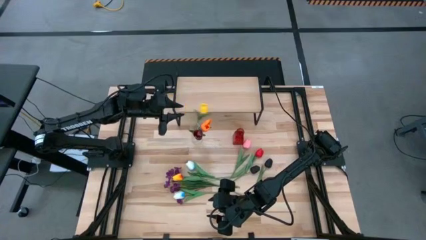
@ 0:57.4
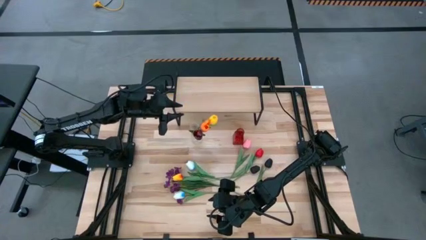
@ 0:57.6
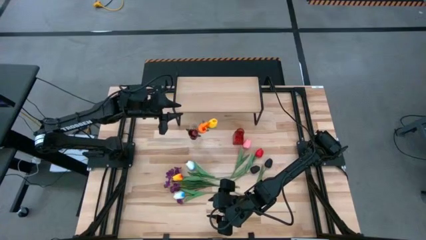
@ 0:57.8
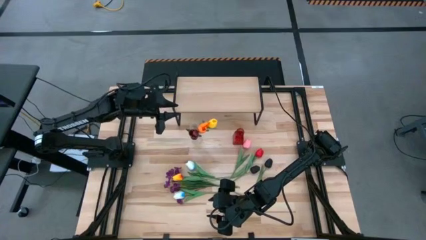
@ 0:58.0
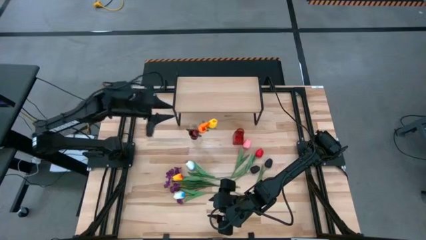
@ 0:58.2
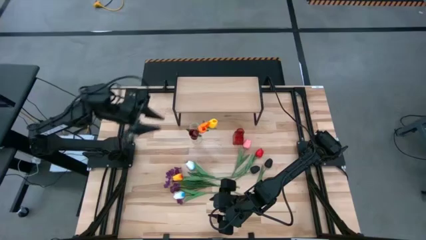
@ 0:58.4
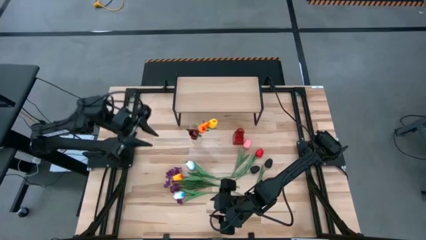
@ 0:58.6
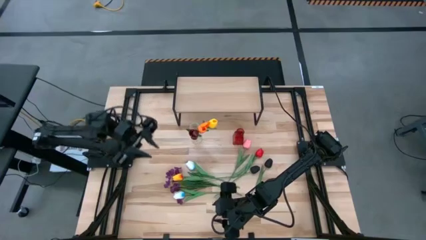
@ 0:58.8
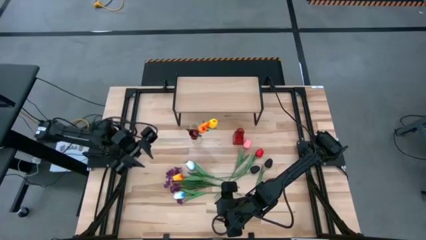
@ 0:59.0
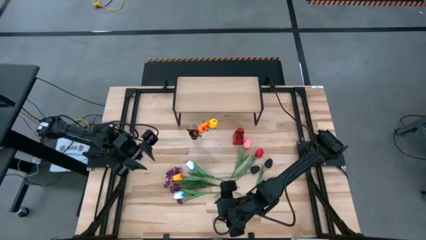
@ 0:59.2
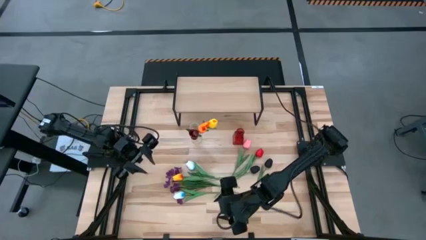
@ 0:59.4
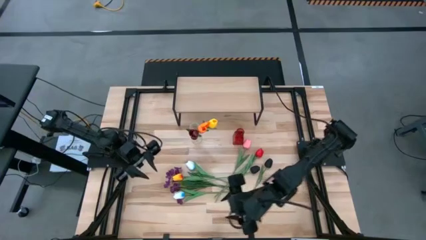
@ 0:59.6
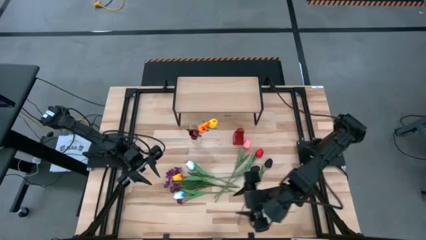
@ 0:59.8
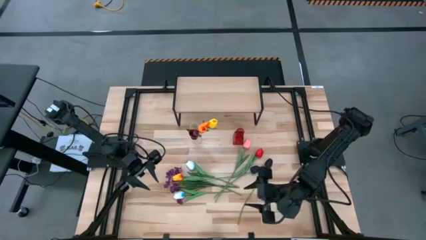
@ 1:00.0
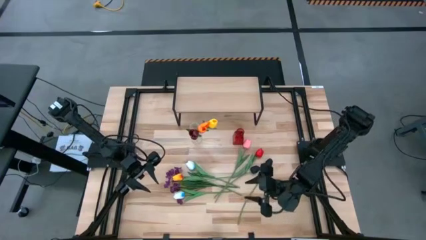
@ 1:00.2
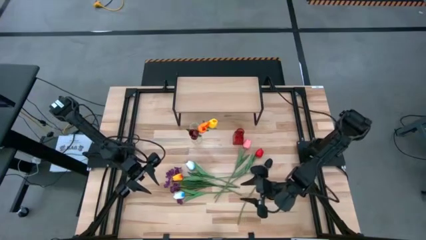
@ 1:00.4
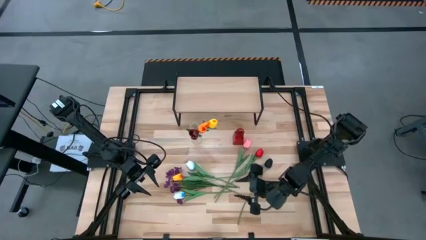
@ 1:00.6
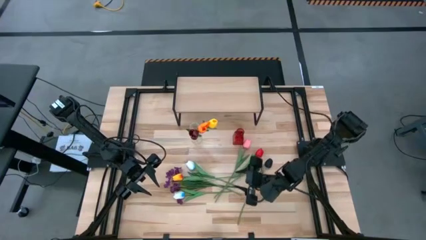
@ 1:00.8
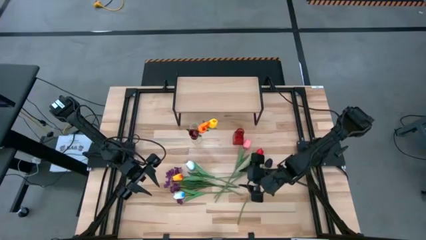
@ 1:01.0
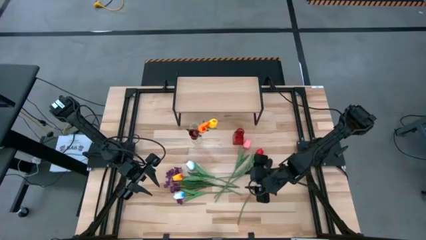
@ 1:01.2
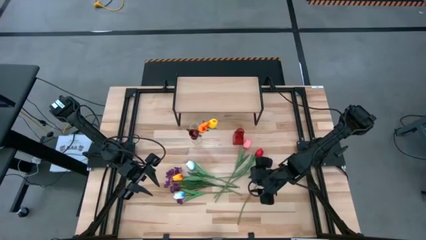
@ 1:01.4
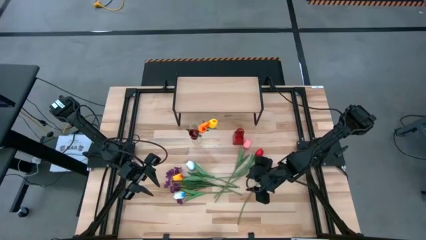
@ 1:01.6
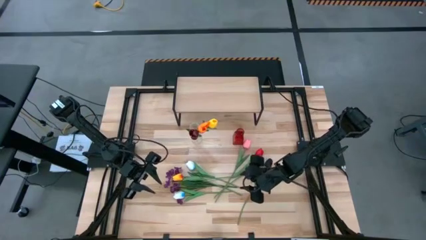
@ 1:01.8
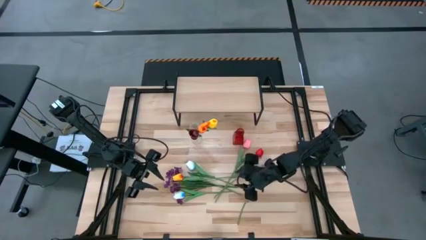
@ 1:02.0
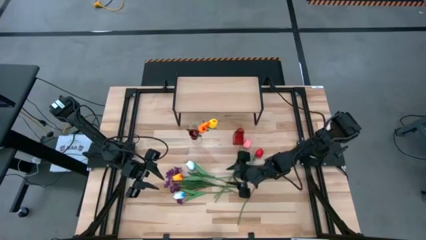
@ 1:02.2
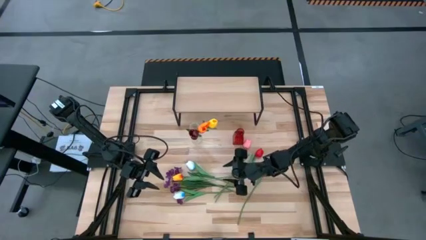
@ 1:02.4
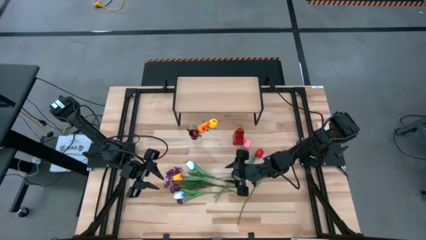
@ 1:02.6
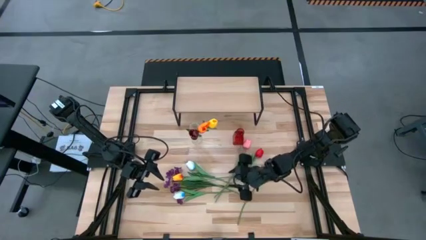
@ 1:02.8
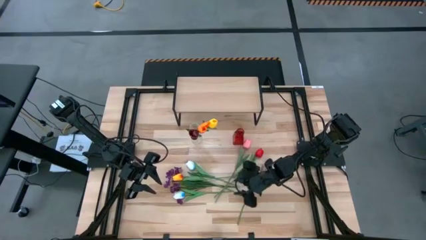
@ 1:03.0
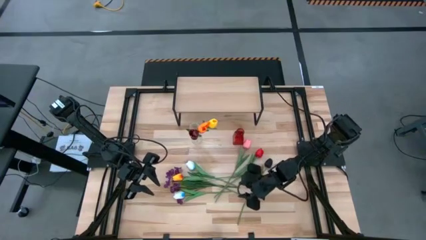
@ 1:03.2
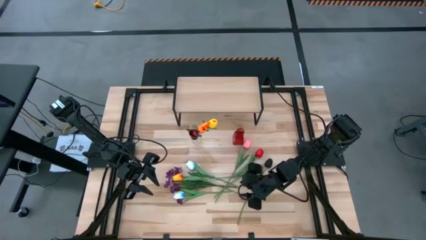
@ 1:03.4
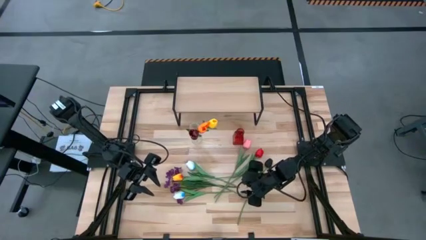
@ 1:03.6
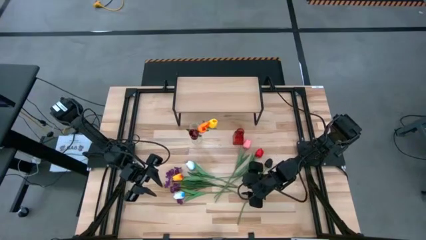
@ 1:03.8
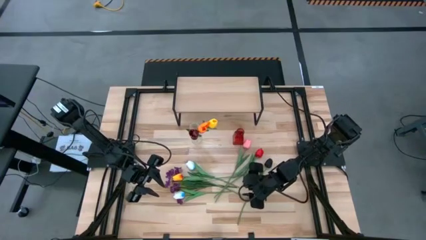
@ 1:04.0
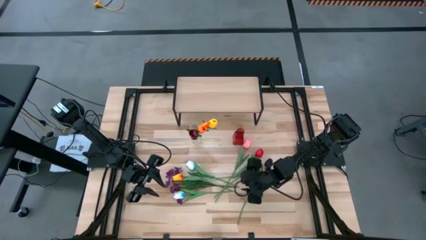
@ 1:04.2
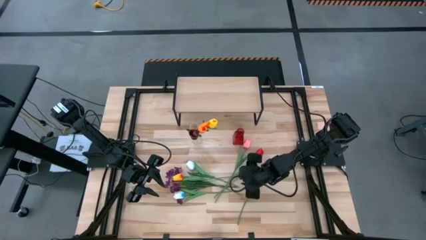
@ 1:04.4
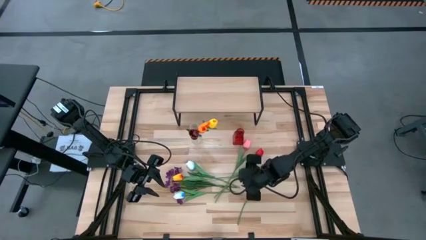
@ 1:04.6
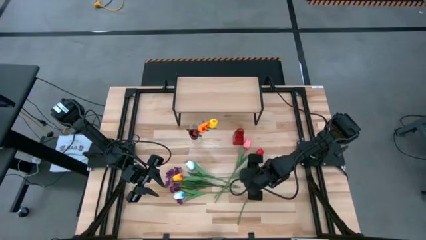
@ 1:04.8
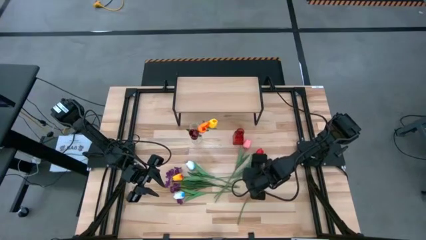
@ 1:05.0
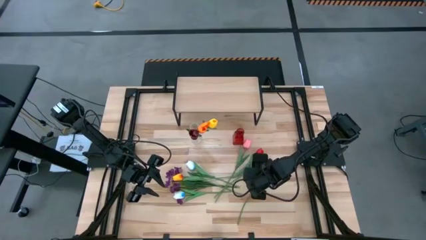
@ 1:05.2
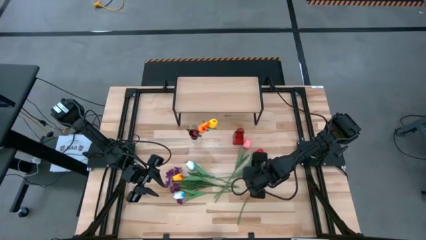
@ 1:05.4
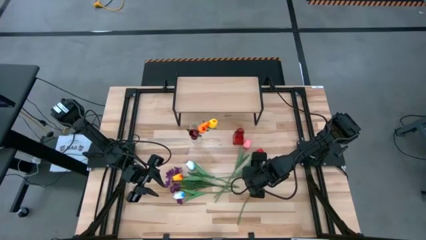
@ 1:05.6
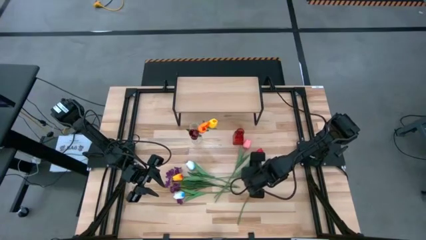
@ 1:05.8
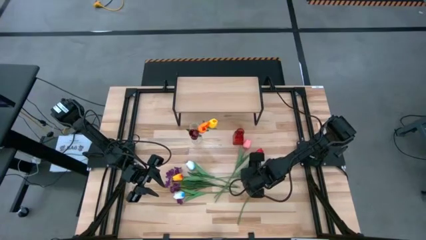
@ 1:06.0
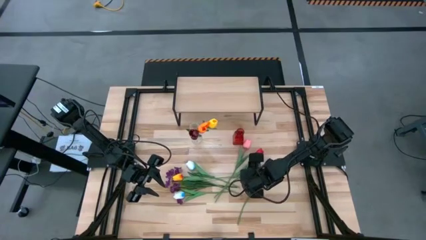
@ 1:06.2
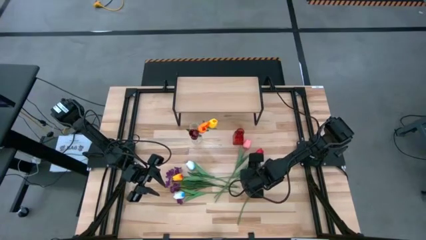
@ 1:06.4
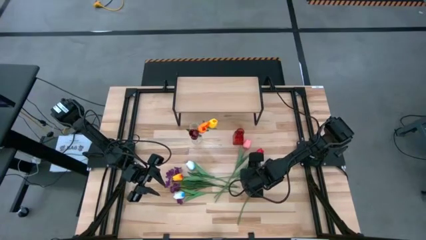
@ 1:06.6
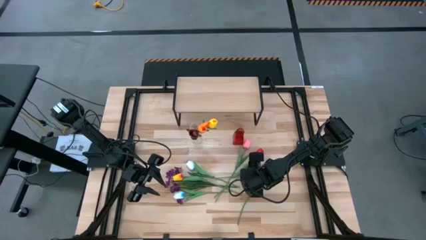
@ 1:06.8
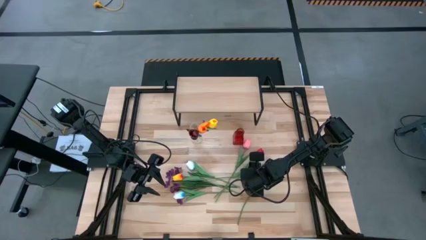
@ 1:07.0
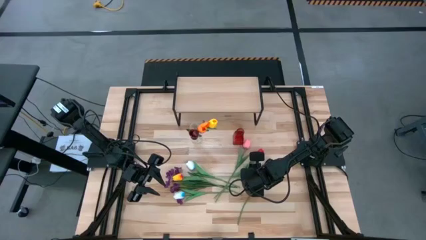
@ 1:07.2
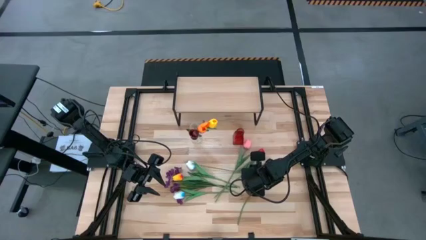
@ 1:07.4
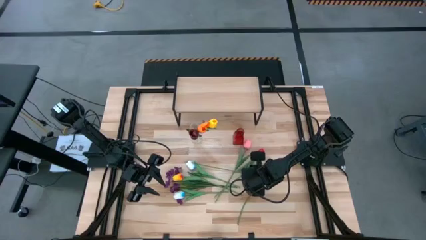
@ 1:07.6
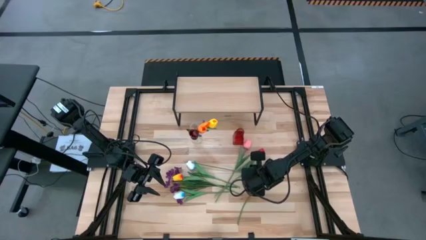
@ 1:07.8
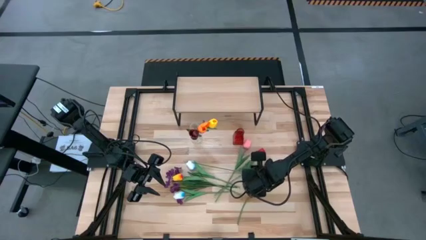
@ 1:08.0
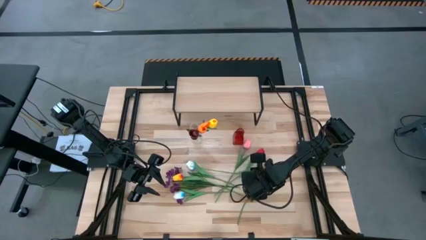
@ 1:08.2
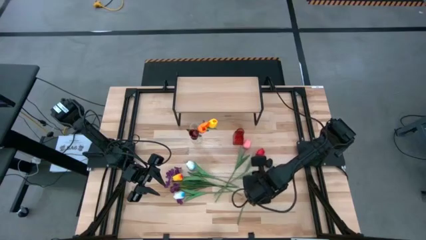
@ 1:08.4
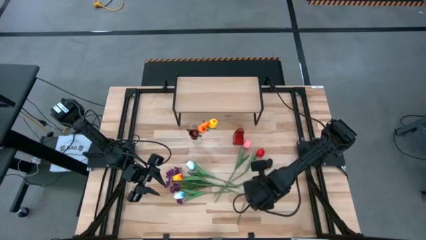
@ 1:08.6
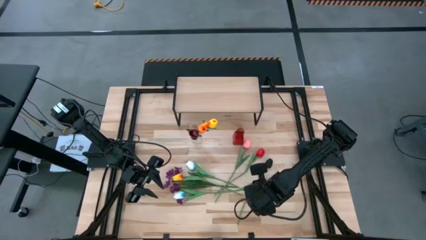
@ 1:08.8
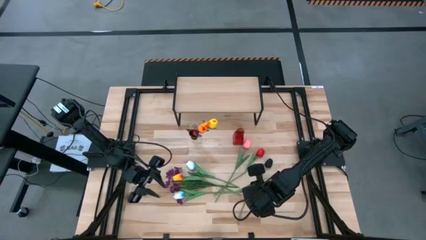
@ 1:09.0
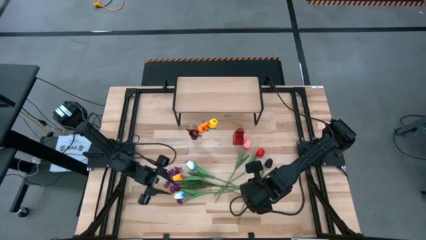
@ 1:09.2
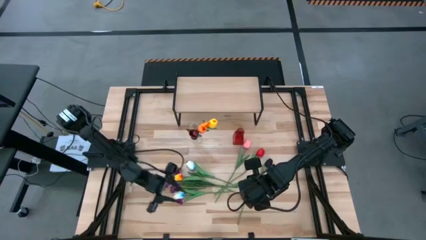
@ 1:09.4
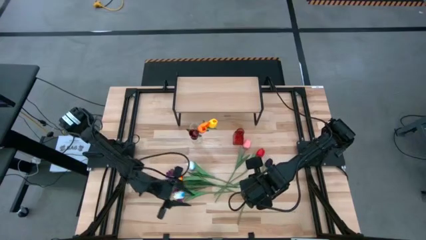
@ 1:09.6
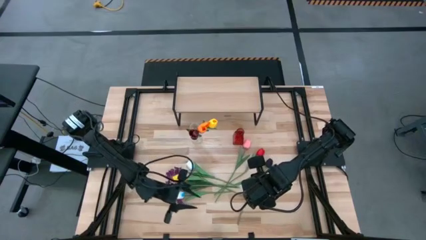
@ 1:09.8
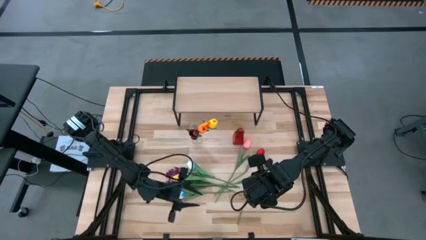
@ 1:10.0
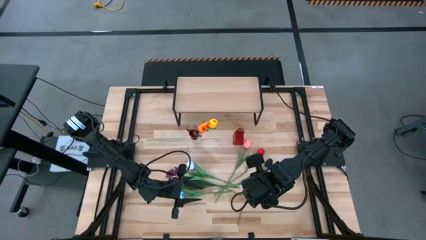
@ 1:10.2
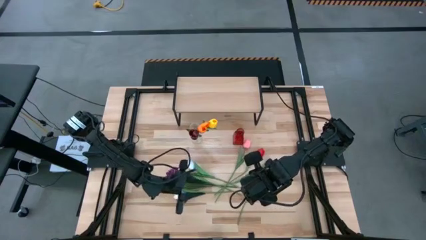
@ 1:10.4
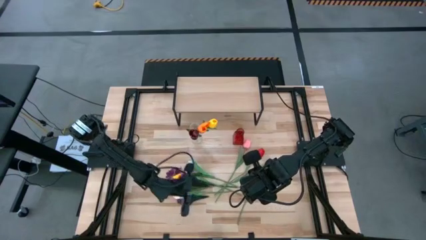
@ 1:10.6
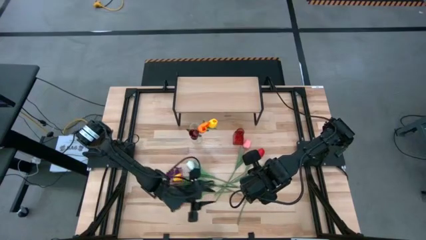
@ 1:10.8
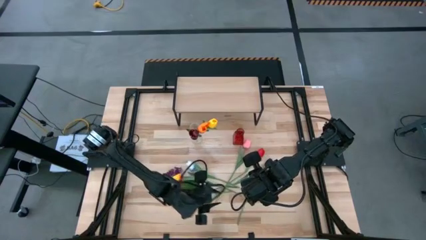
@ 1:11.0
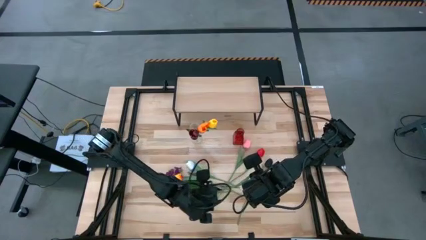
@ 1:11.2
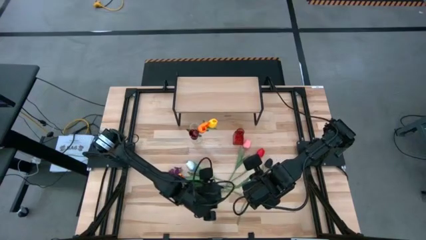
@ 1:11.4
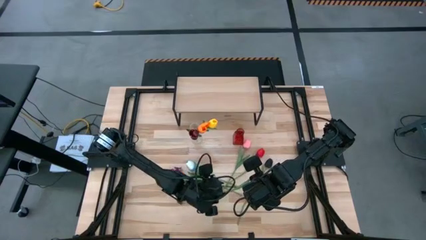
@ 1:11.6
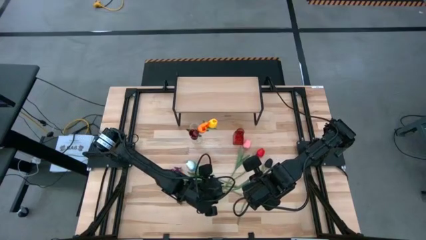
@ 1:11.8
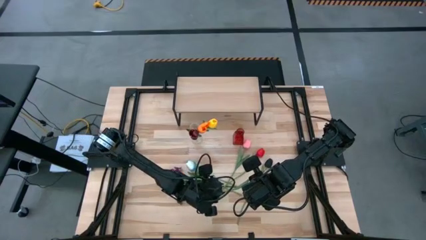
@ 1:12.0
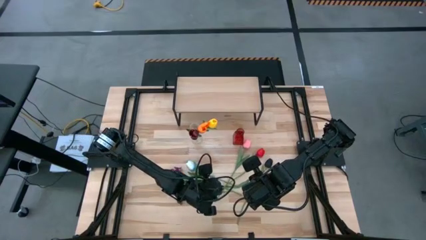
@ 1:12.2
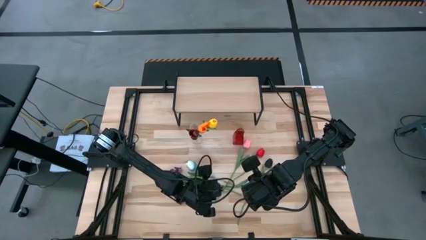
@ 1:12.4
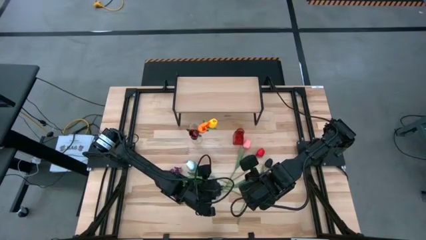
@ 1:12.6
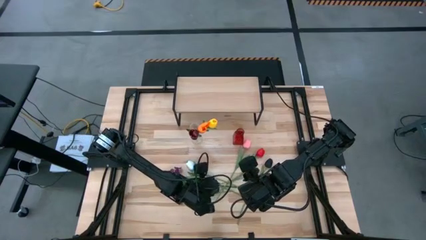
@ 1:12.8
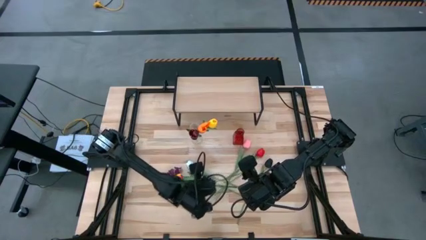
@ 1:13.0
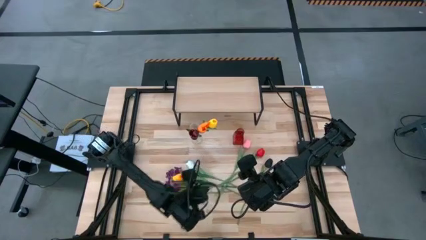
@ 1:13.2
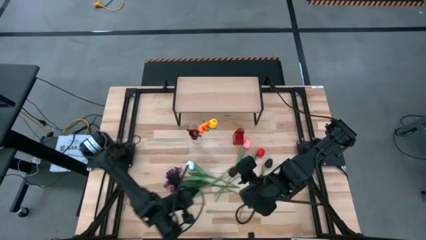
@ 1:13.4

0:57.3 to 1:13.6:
Task: Pick and place flowers into a vace then onto a shelf
Put the left black tulip into the transparent vase

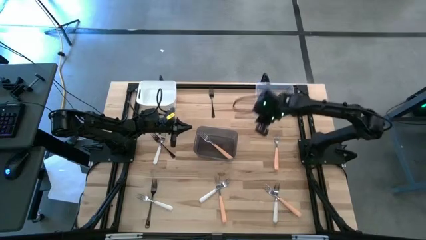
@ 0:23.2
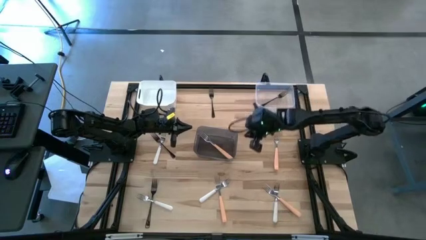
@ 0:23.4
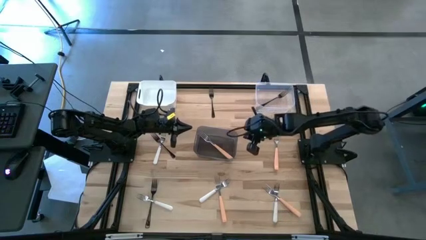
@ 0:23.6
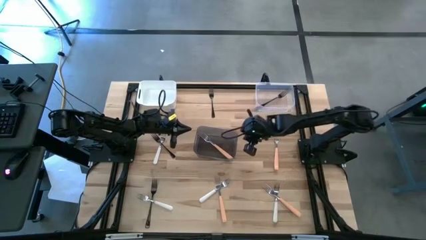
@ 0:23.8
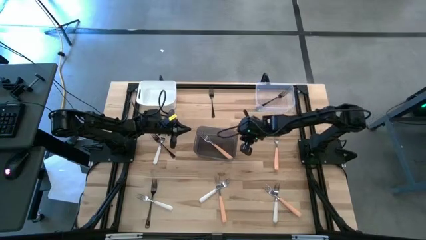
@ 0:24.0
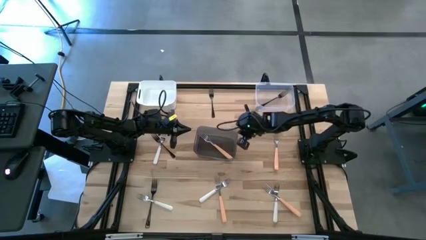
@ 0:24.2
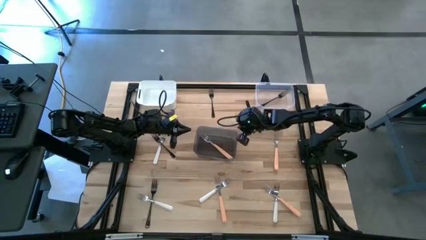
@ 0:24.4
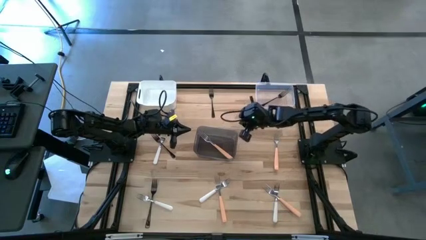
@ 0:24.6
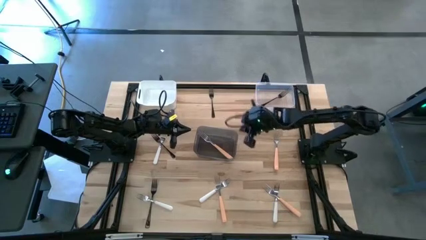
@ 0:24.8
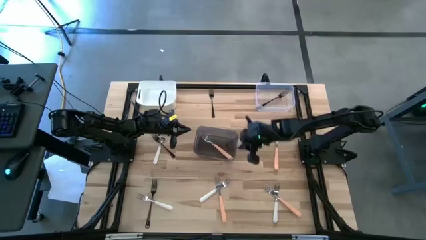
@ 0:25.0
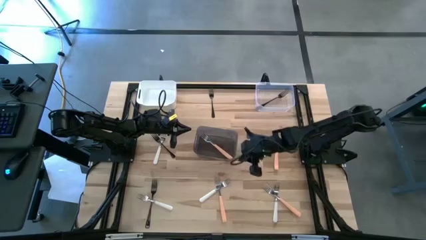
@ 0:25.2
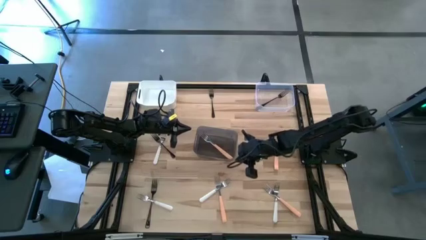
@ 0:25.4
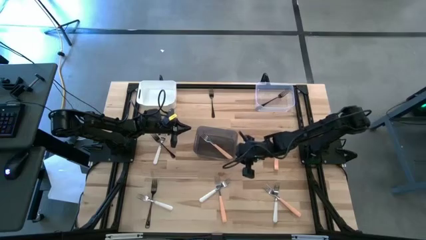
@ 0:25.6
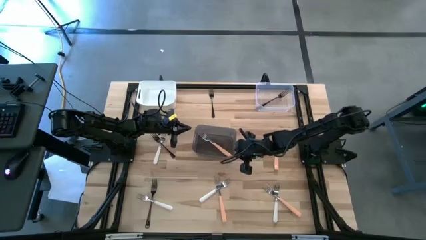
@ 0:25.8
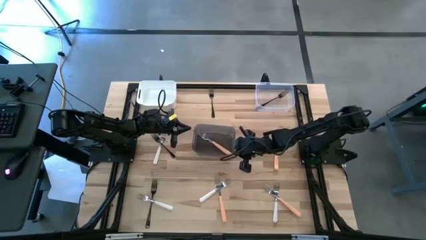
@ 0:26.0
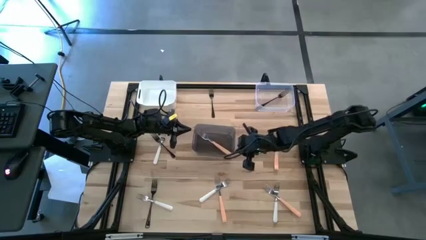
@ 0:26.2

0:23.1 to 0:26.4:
Task: Sort silverware by color (type)
Adjust the black bin
